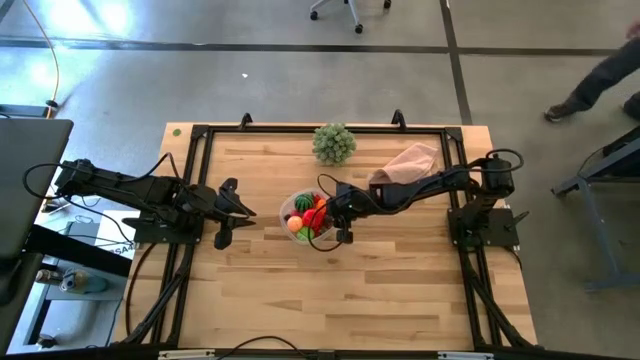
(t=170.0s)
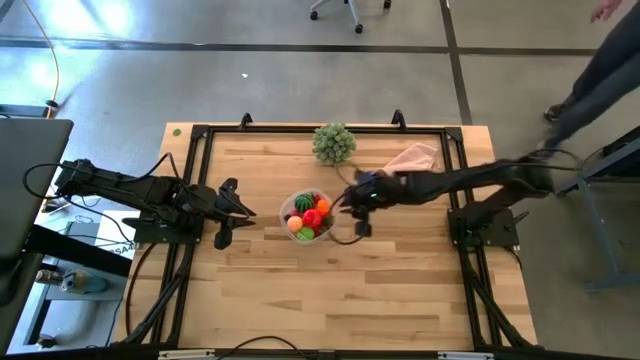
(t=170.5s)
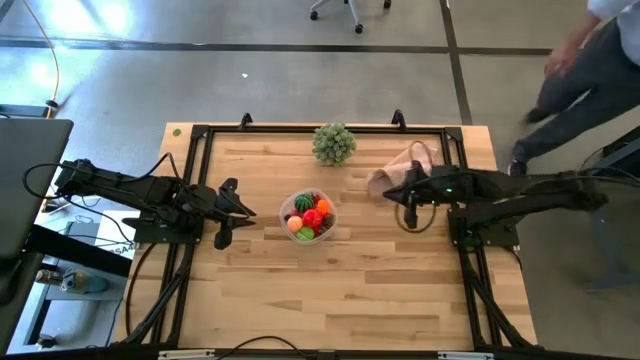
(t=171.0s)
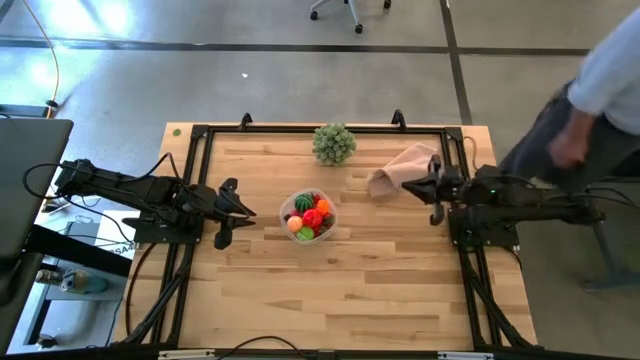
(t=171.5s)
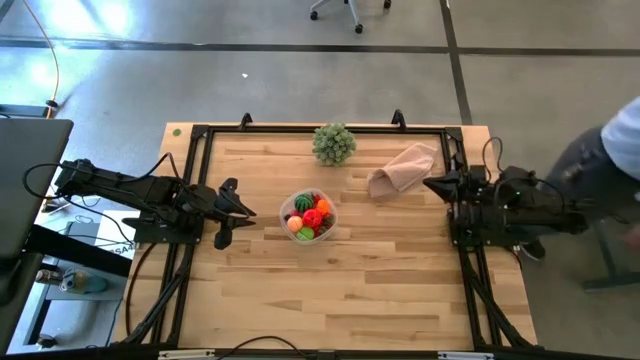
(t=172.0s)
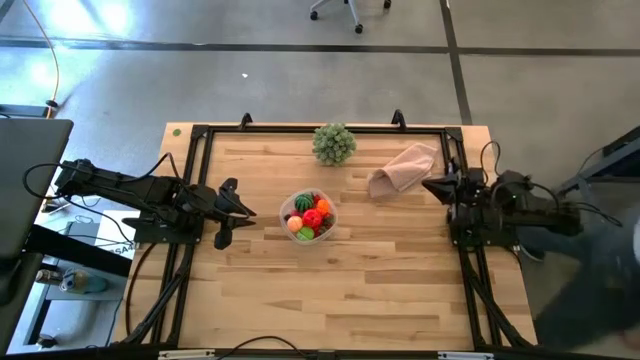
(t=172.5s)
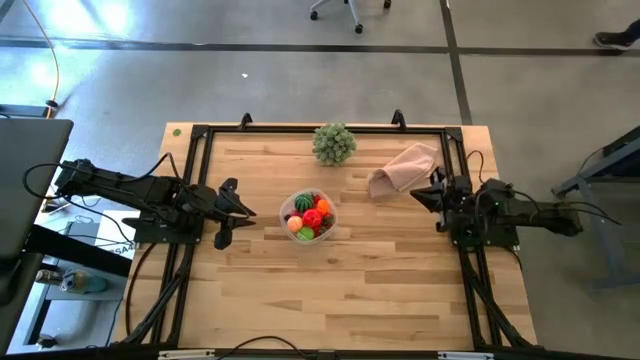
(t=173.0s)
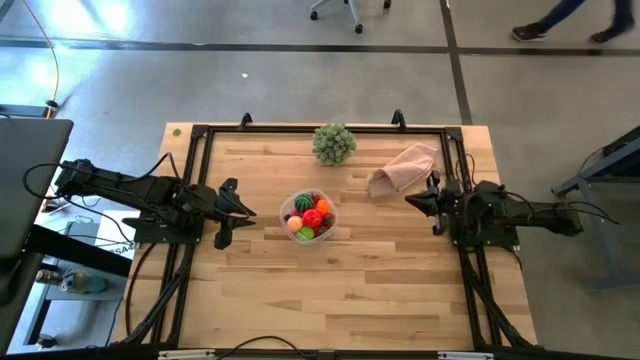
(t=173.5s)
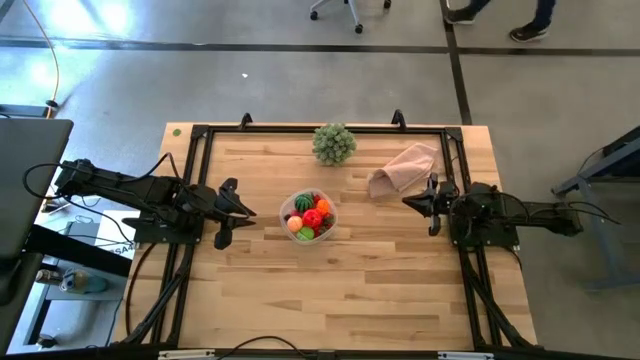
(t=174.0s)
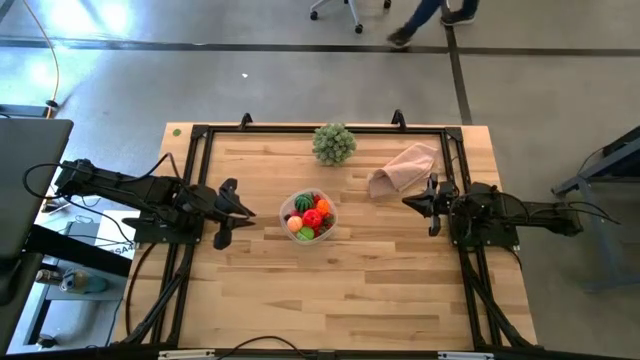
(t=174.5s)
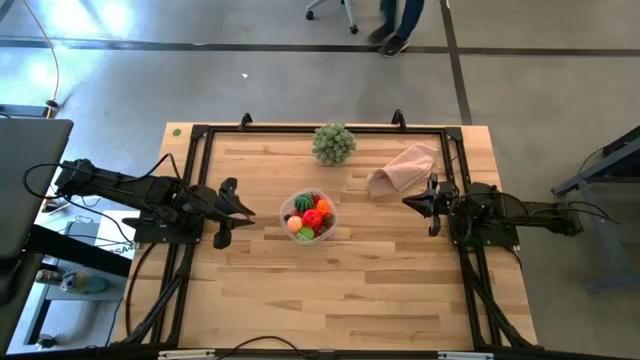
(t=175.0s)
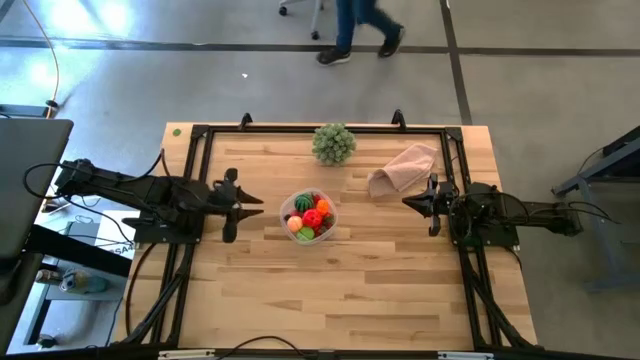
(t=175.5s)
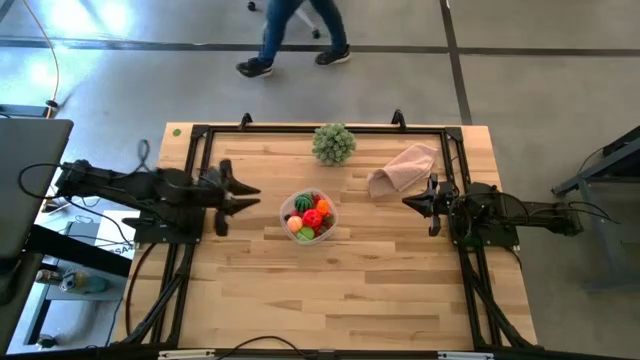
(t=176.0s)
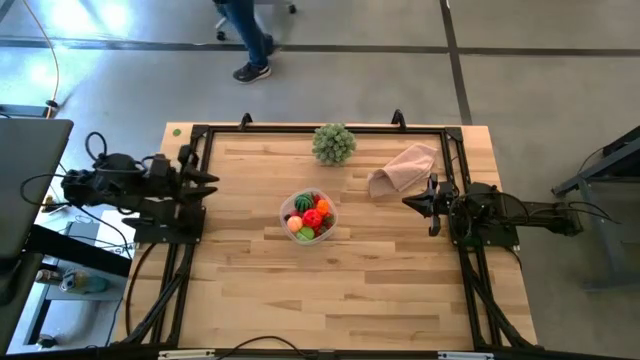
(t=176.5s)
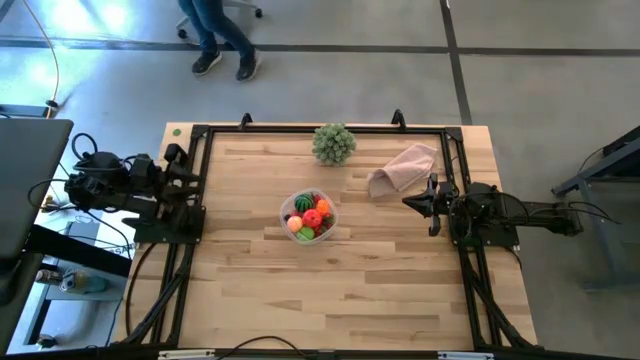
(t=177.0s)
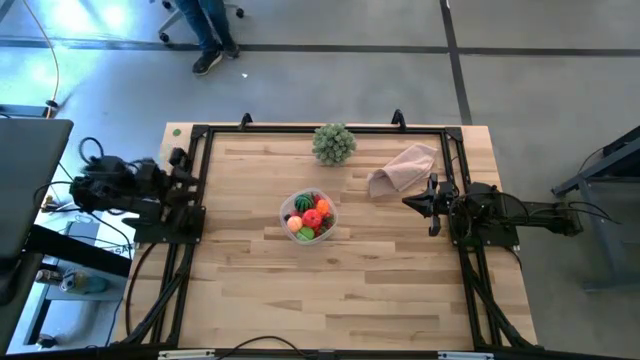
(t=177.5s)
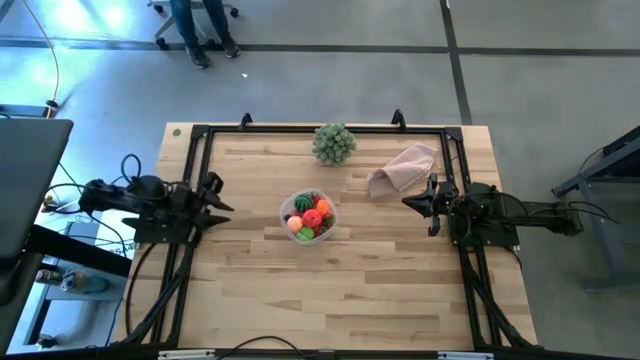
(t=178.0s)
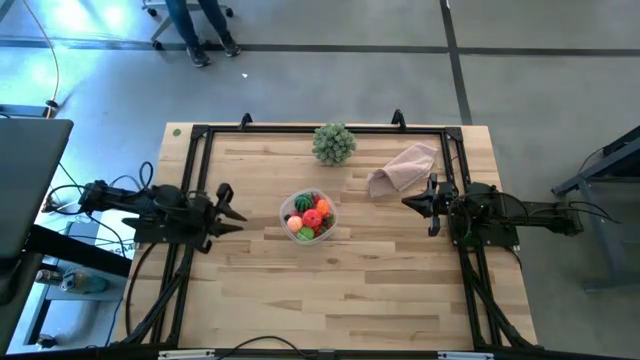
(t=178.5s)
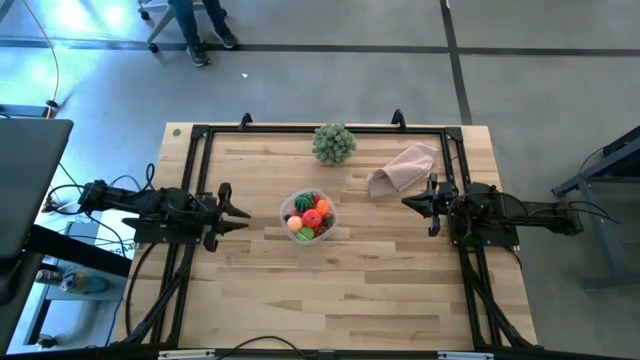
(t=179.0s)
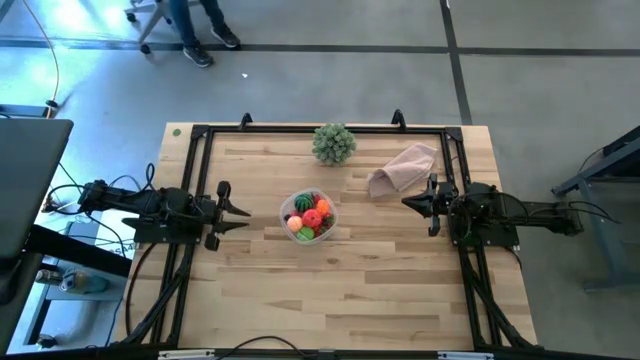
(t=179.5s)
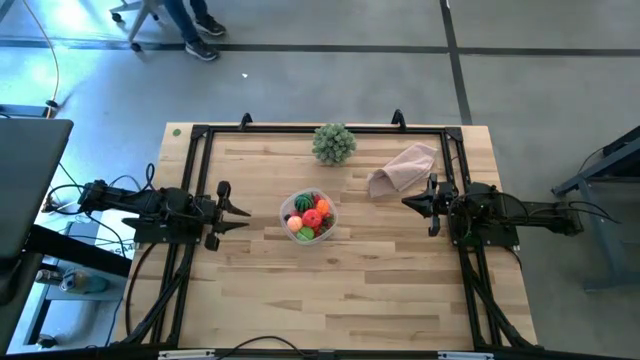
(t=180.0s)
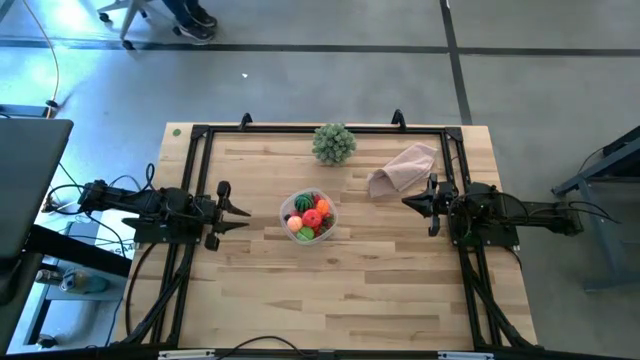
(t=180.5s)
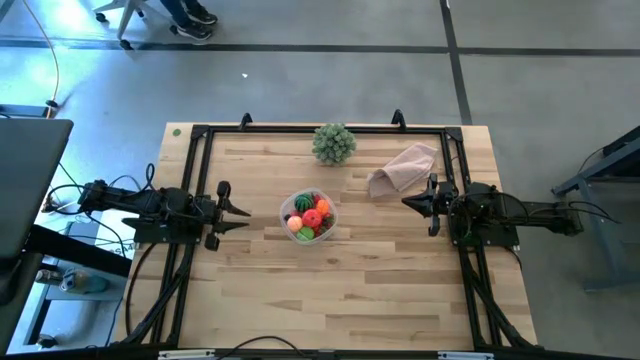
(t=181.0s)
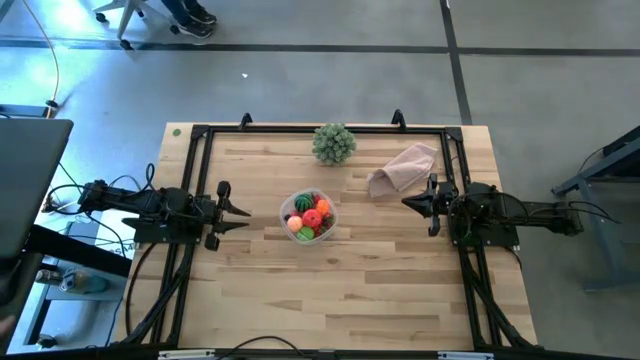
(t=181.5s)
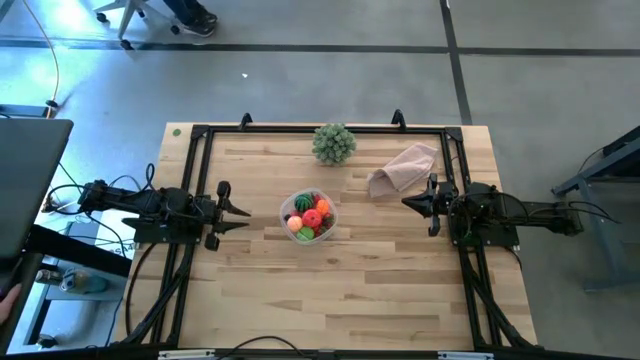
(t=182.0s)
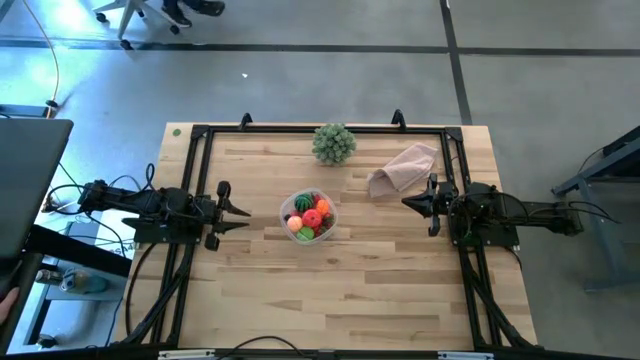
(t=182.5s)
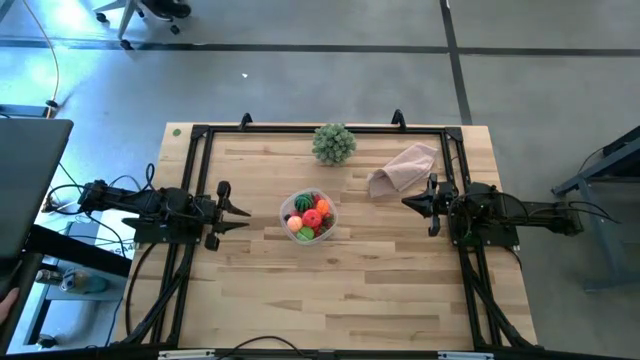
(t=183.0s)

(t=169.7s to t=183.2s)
Task: Pick and placing Produce into tupperware
Return to Home Position

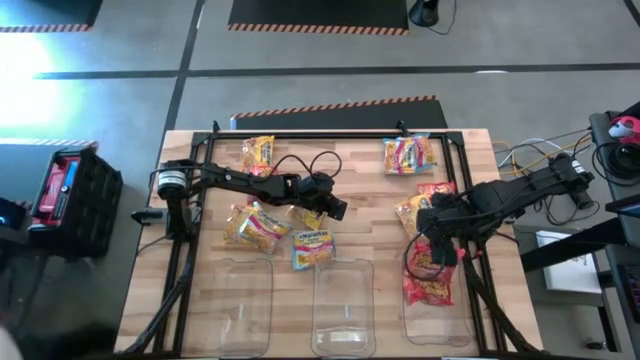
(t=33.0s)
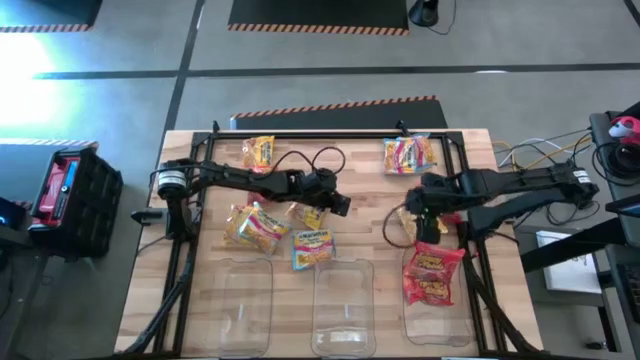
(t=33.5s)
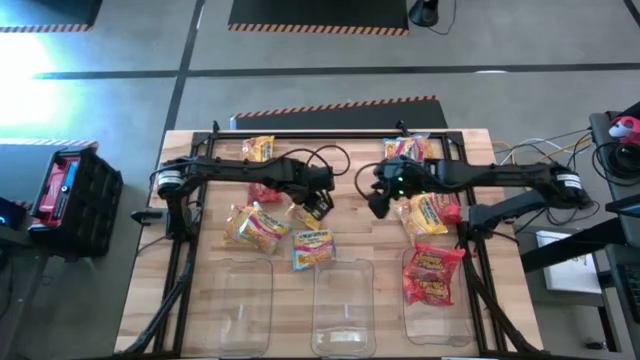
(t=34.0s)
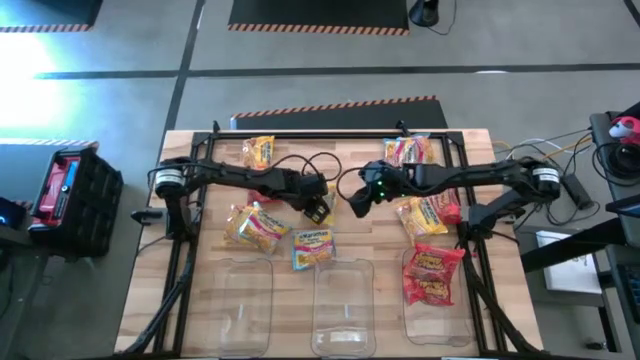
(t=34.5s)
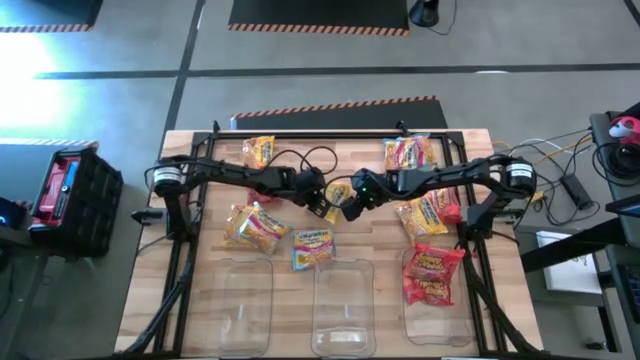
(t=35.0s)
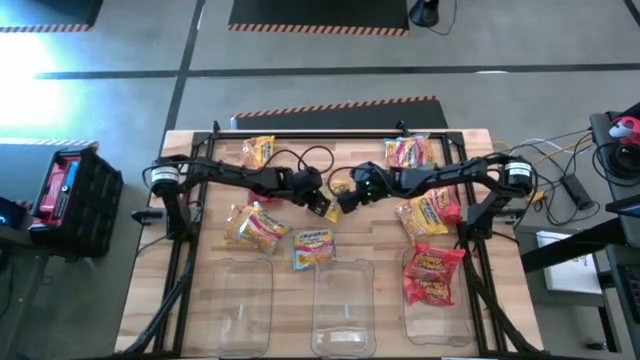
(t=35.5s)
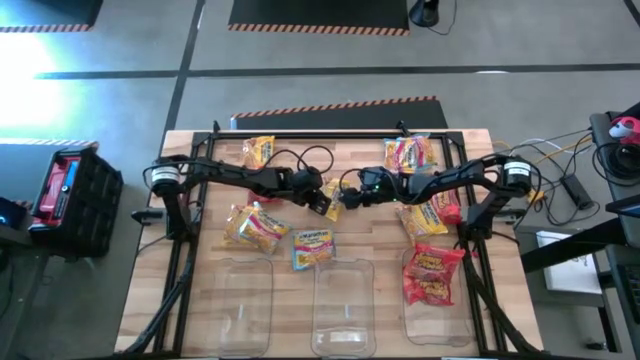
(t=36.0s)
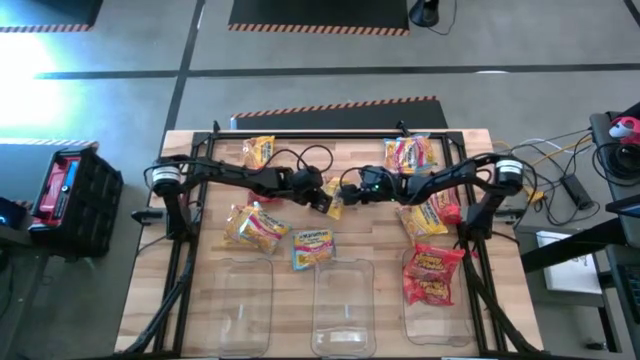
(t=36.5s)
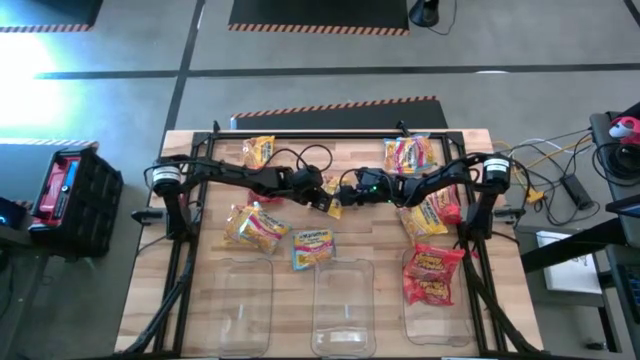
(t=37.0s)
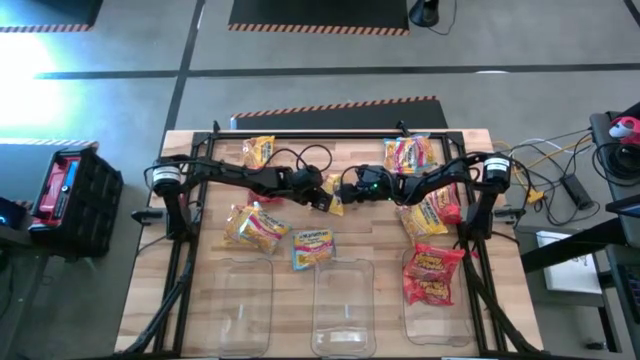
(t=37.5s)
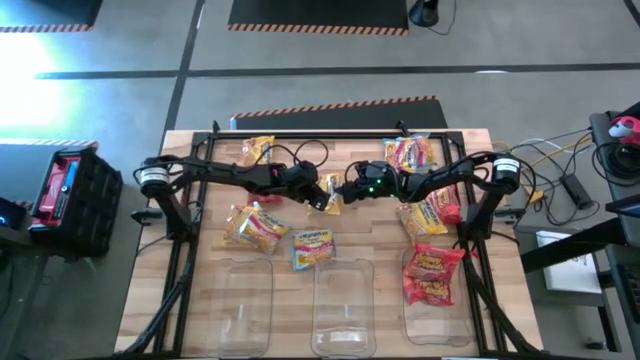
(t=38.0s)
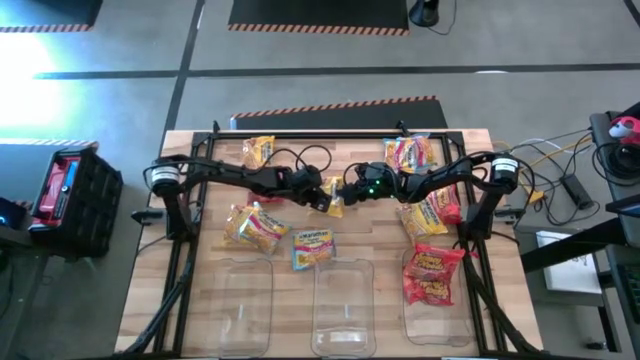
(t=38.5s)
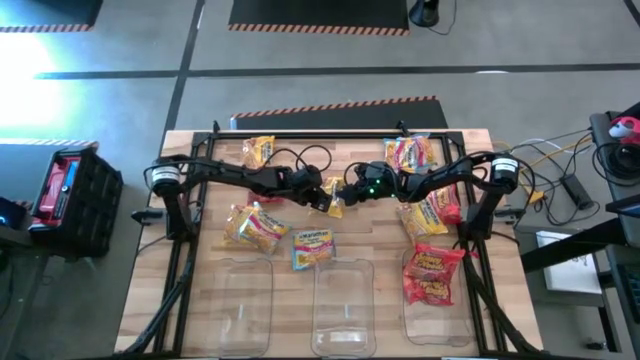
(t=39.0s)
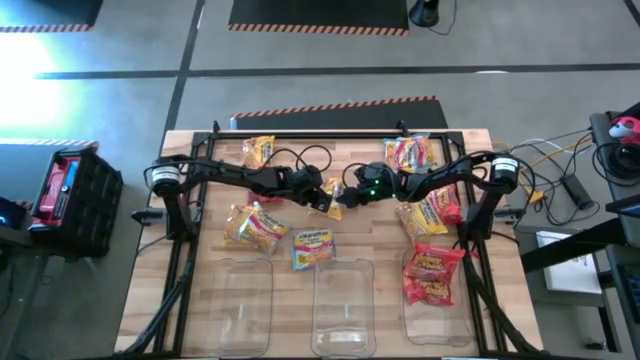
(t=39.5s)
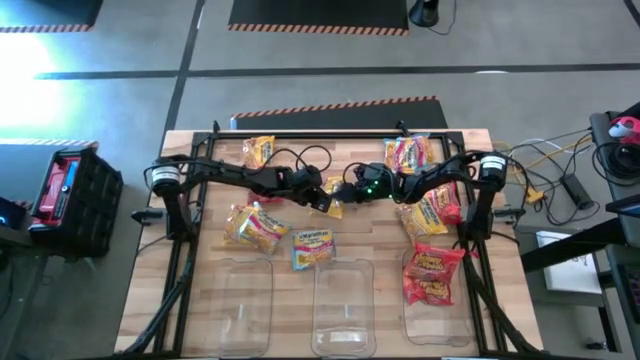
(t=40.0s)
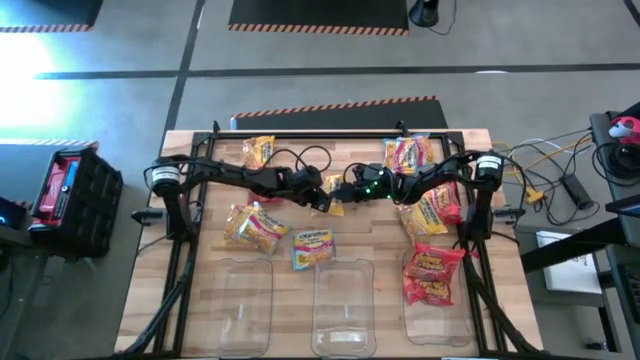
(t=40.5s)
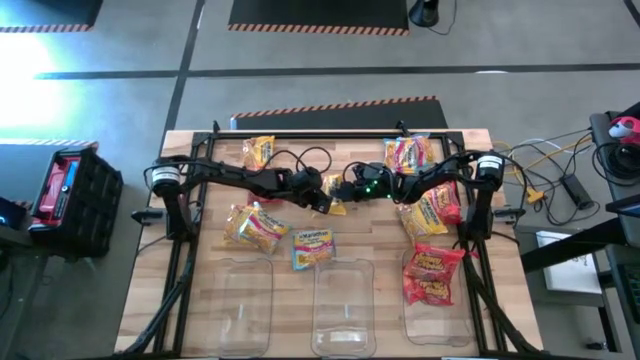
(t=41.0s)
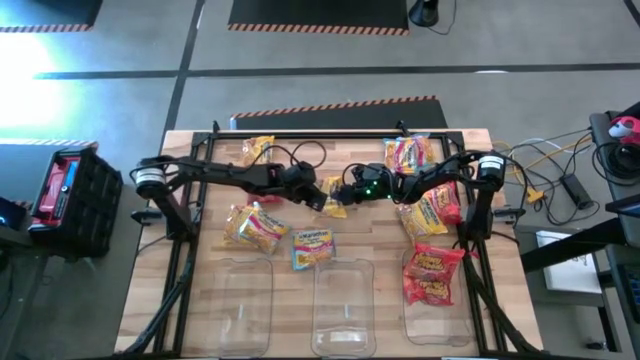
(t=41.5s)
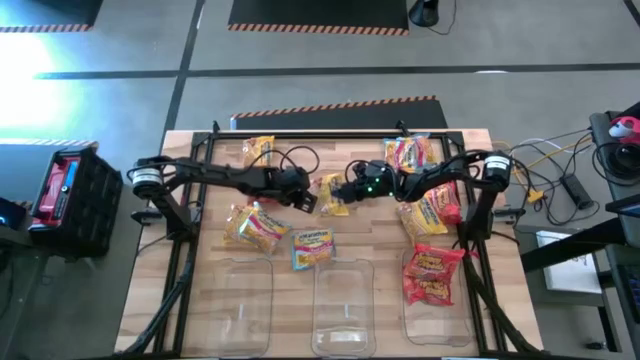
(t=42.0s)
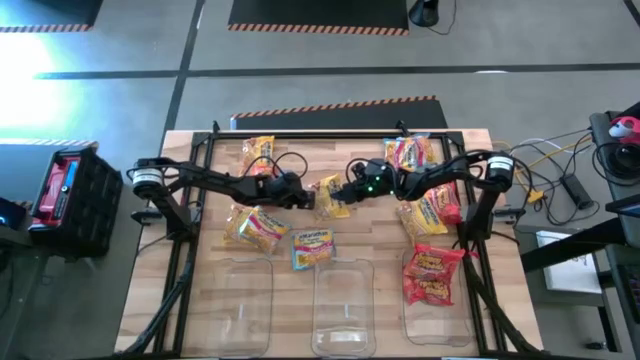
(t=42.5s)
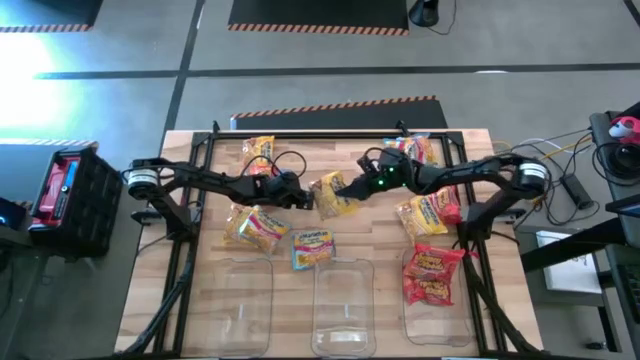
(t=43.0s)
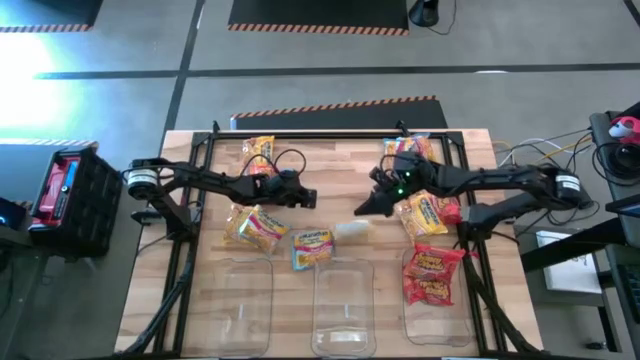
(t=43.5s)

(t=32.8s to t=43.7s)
Task: Sort Maruchan noodles
Put the yellow noodle pack into the middle transparent bin
